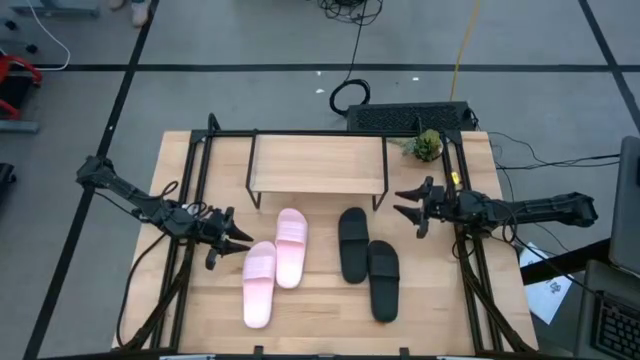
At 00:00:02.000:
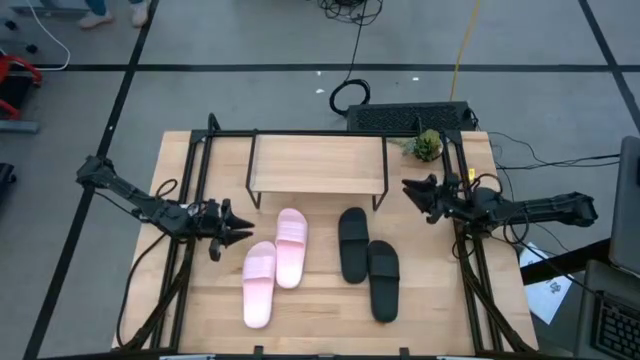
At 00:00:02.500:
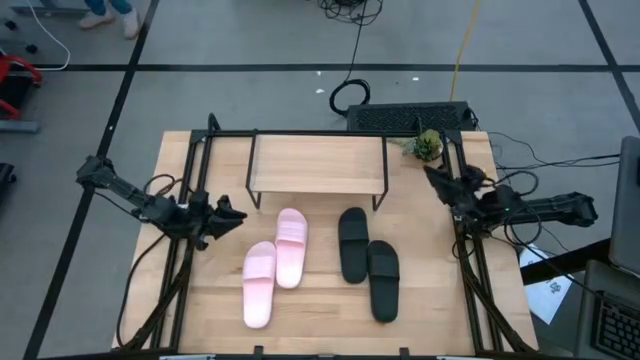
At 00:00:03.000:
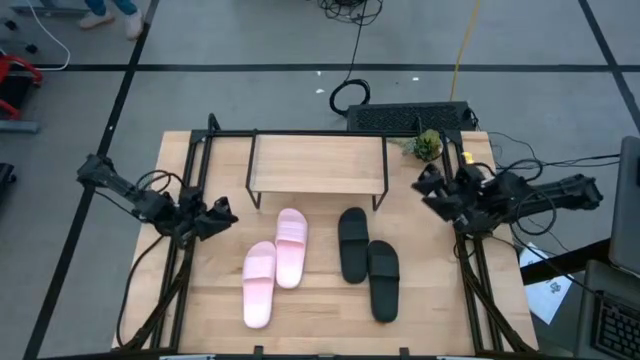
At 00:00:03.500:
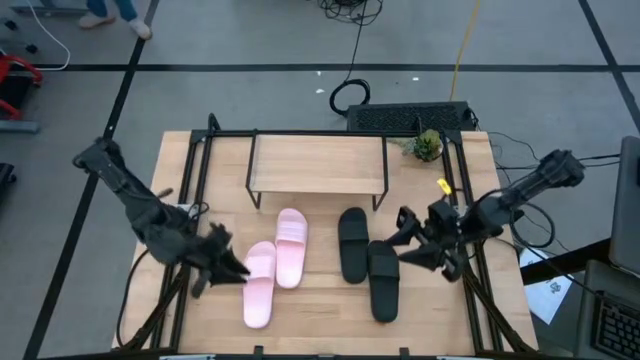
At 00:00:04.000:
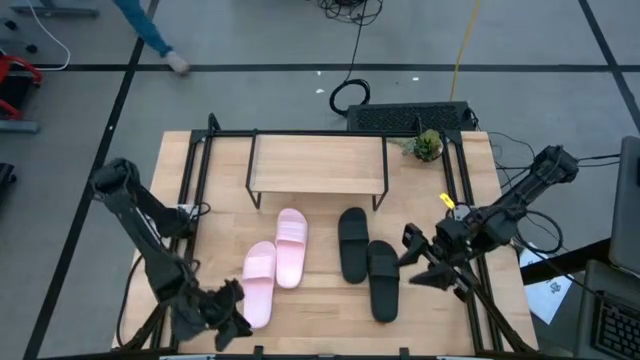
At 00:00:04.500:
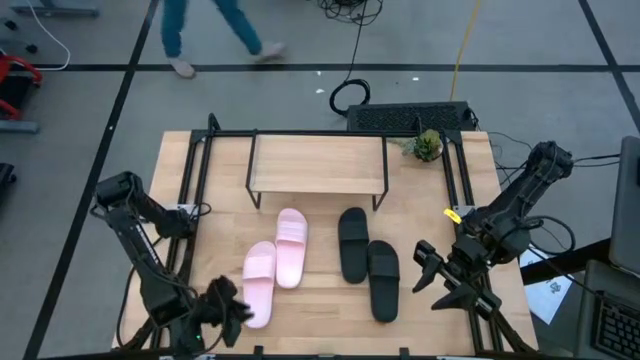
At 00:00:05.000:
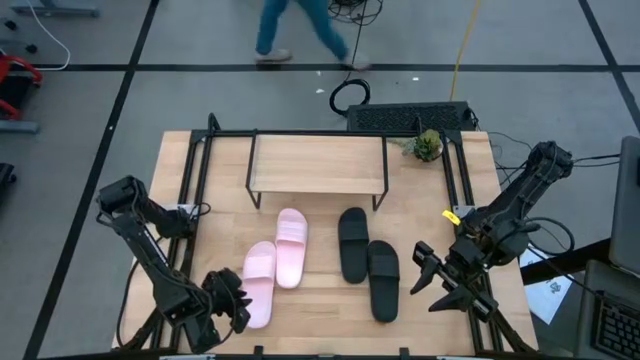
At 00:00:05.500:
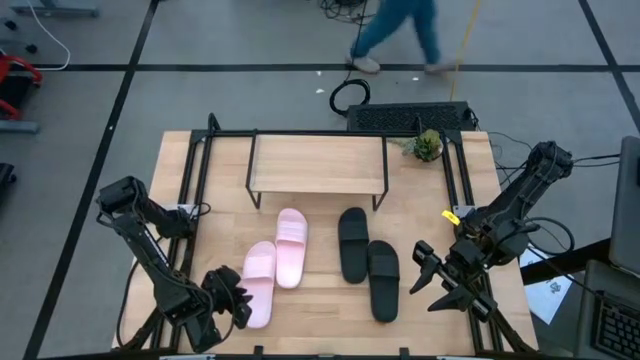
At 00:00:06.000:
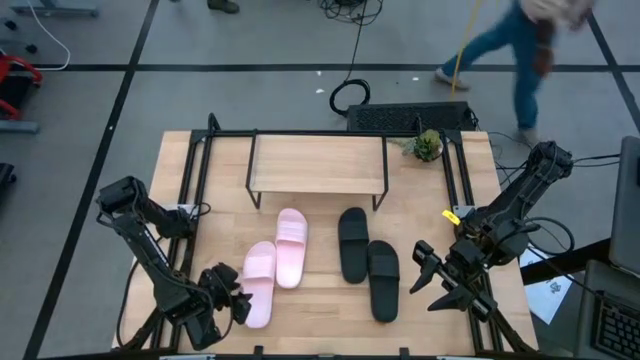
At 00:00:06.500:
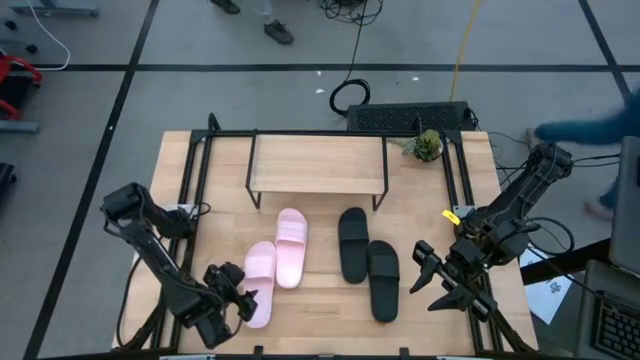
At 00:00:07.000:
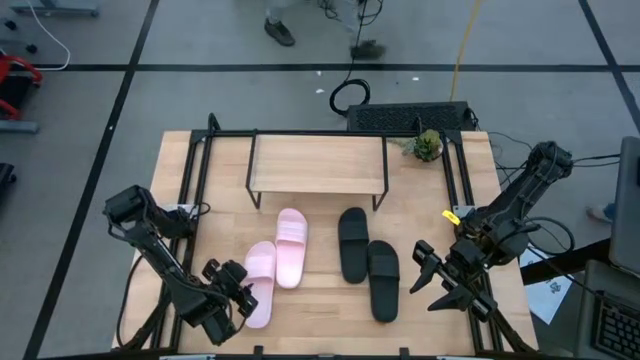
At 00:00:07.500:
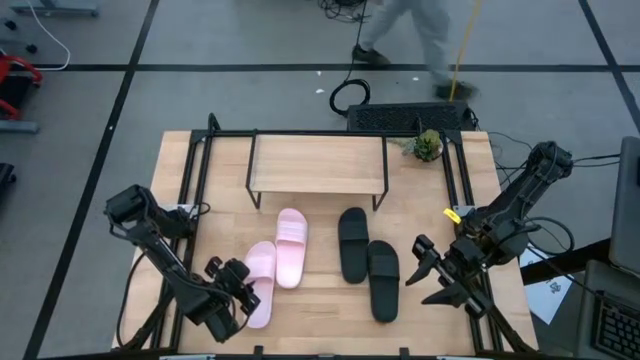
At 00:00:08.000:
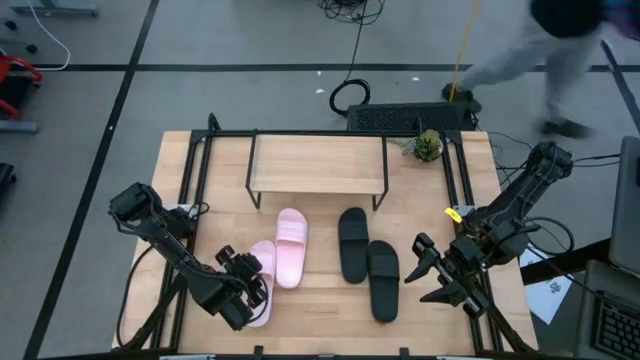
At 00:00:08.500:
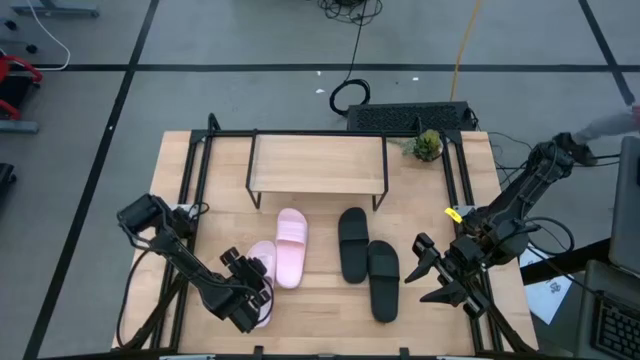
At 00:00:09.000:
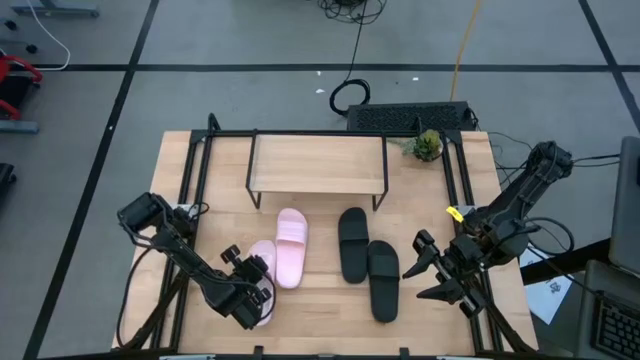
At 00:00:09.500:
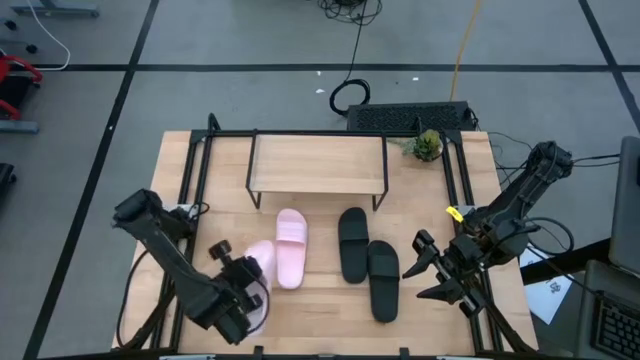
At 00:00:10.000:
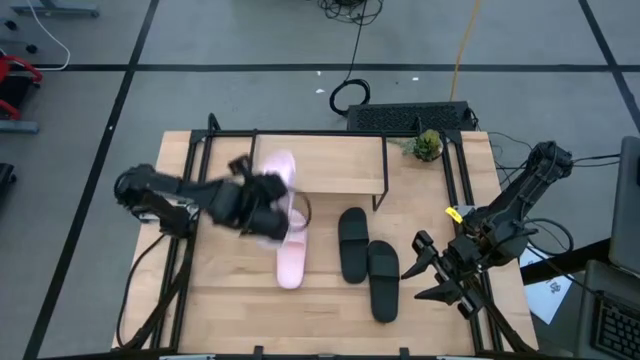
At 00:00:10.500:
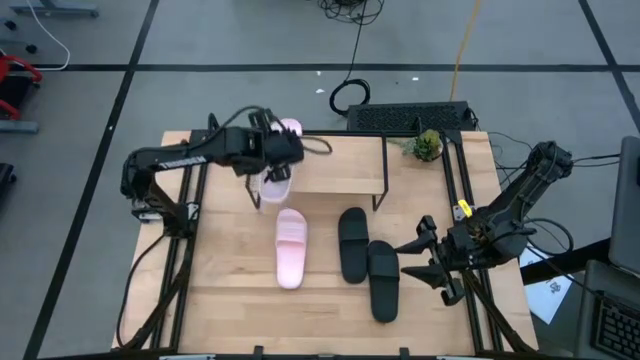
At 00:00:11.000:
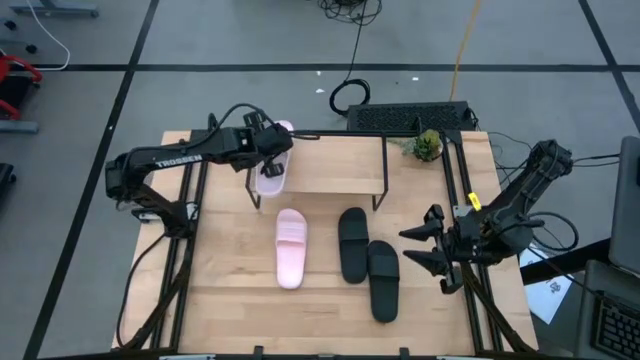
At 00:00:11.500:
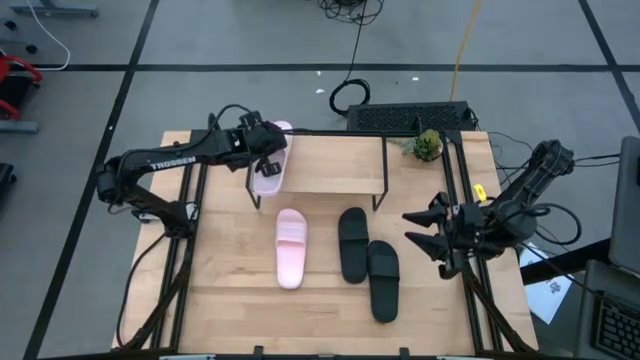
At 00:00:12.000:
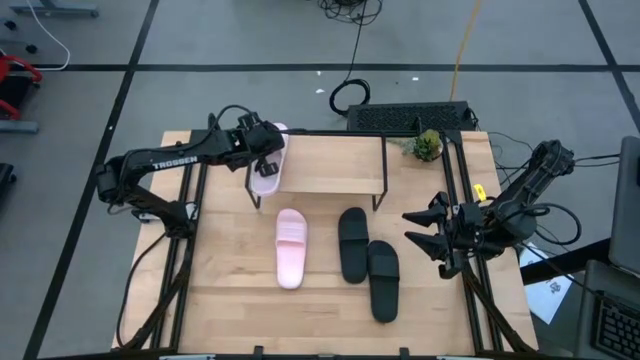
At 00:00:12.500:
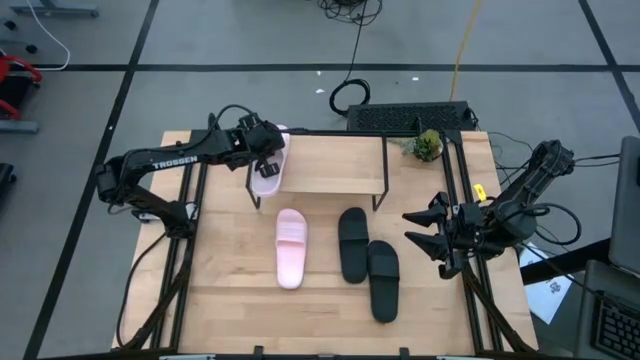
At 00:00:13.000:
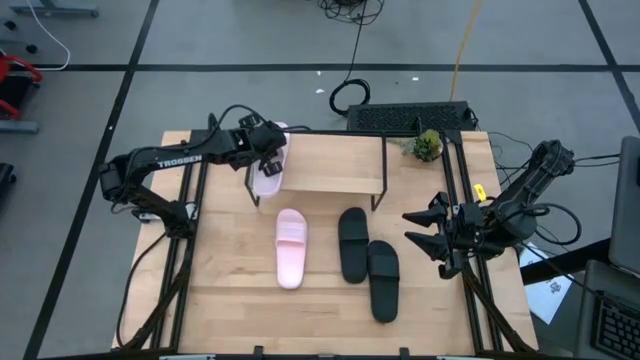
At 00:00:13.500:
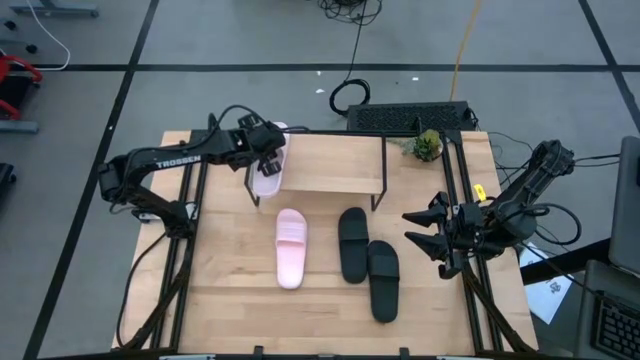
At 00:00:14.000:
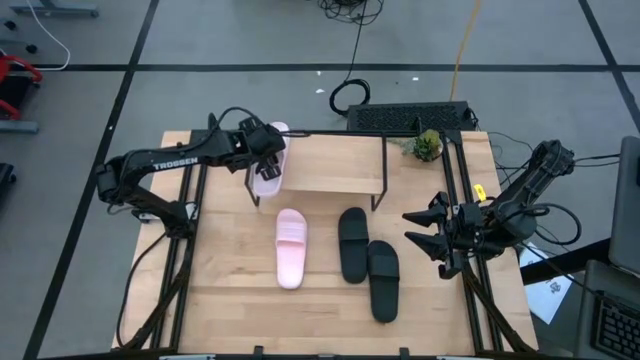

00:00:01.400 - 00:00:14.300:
Task: Pick and place slides into the shelf
Put the left pink slides on the shelf

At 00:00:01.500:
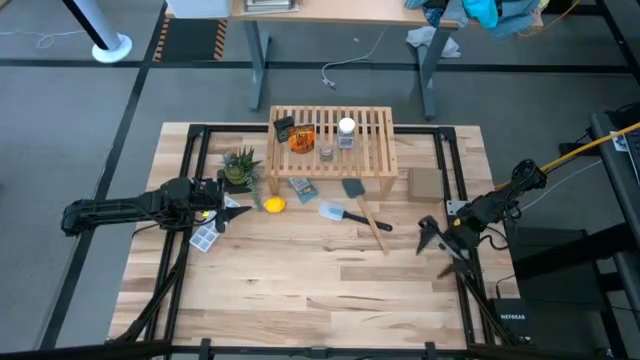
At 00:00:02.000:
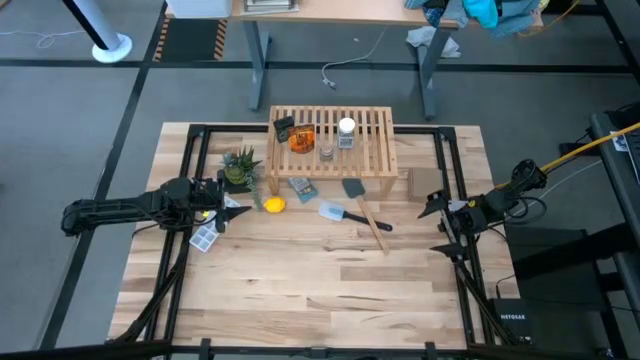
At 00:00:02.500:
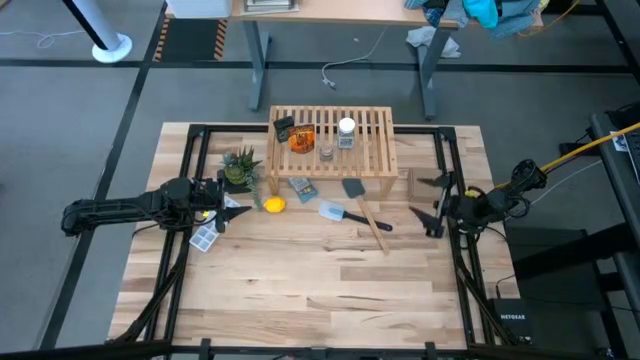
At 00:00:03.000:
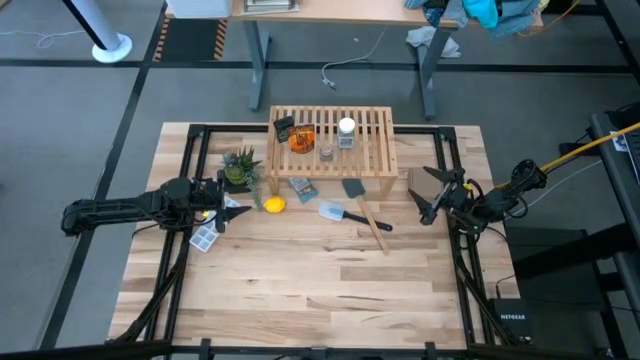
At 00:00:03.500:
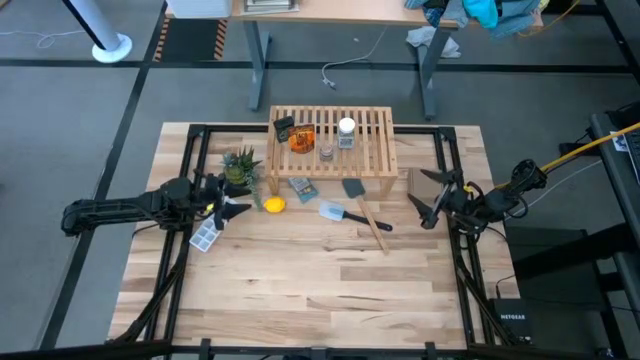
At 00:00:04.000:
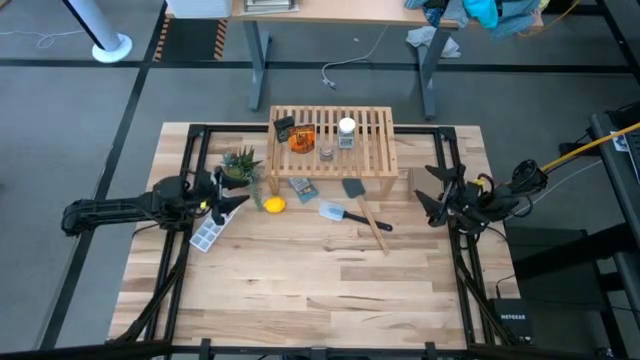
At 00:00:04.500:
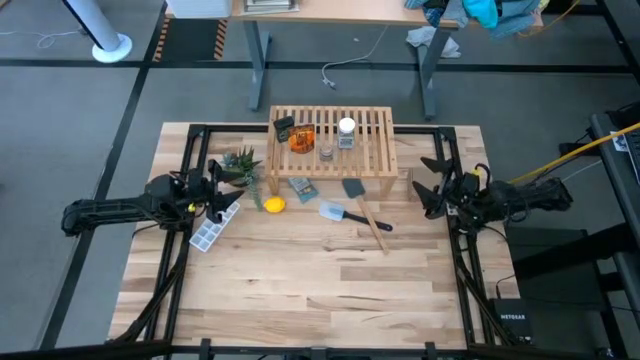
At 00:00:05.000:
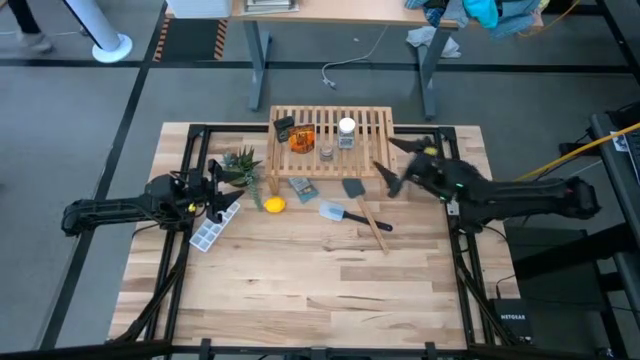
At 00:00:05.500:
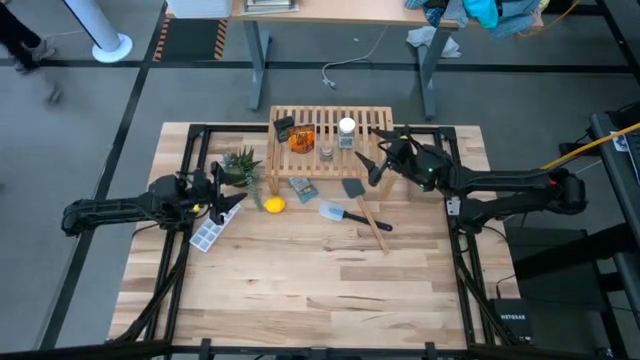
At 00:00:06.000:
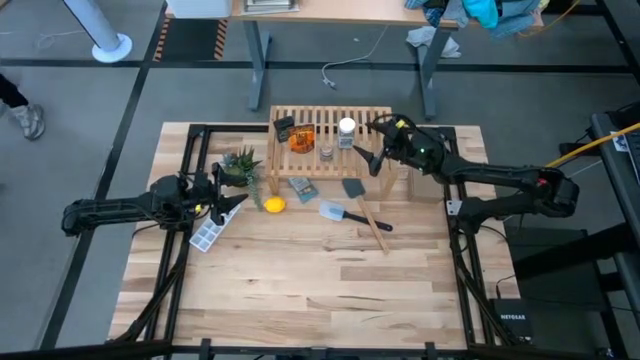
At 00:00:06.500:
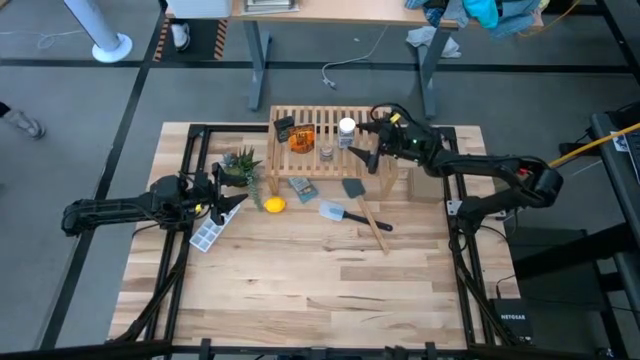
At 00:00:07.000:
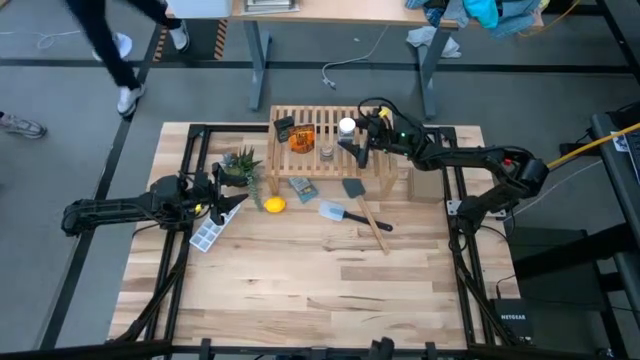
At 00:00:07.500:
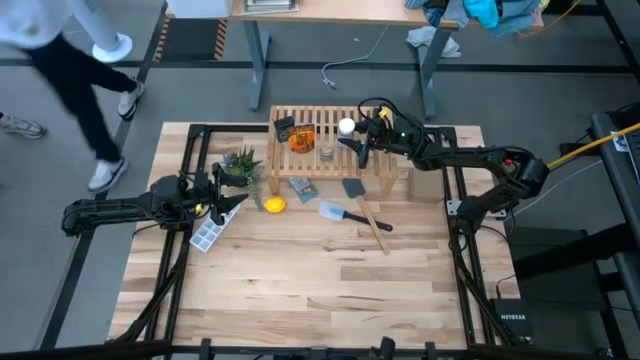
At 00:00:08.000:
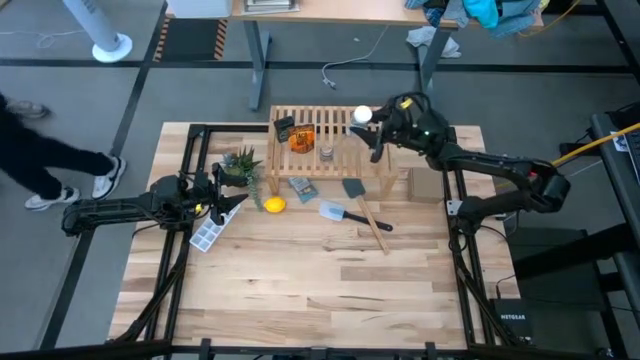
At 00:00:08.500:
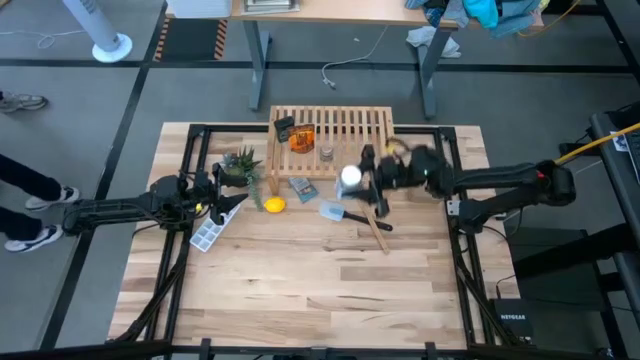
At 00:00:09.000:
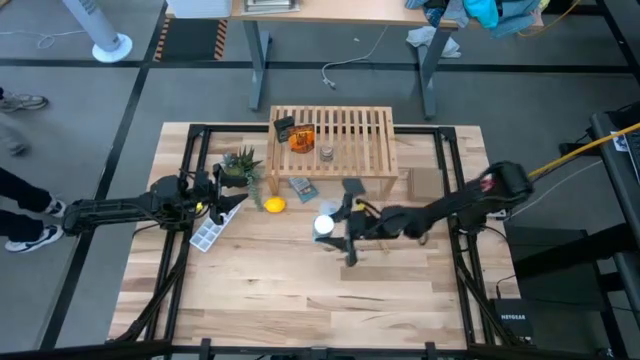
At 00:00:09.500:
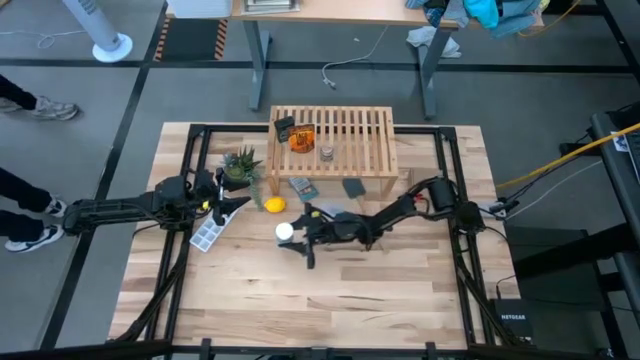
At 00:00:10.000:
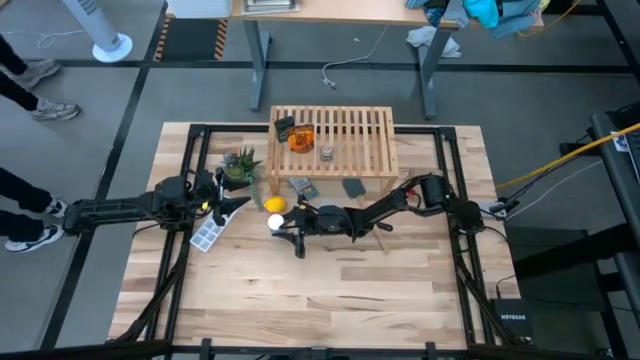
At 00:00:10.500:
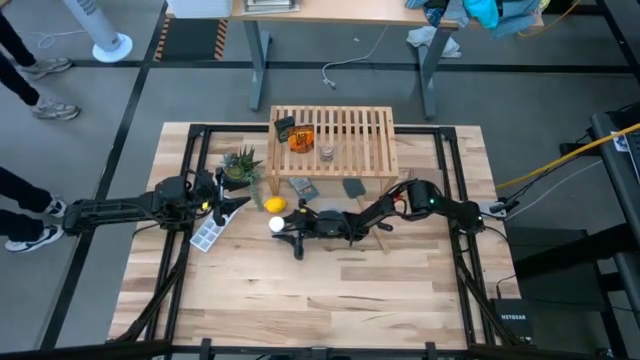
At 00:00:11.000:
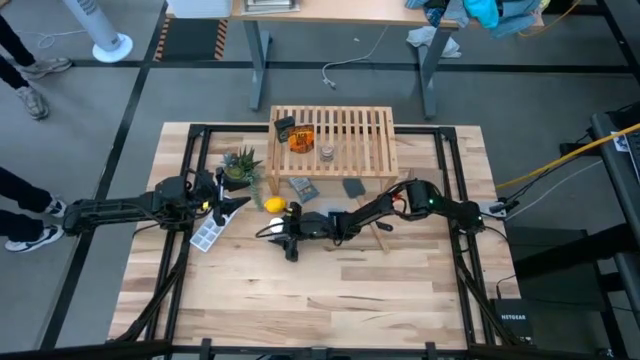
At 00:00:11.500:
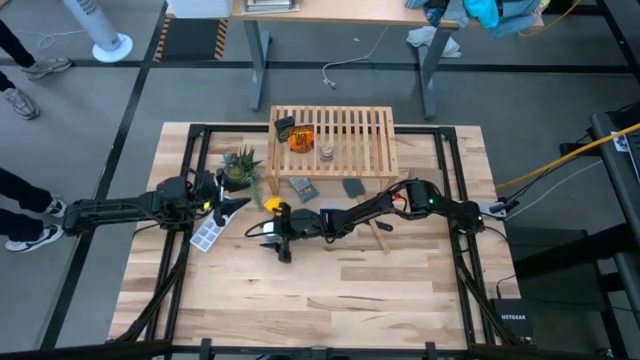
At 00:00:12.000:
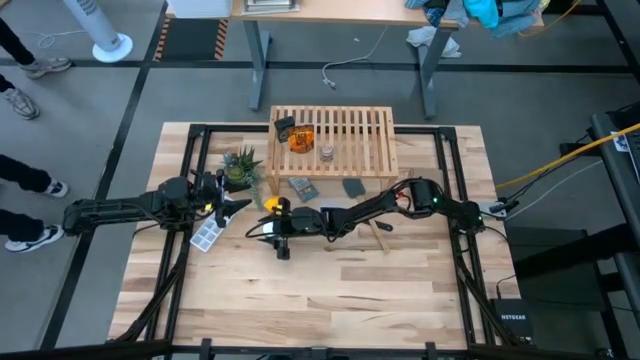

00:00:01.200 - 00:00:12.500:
Task: Shelf spices
Remove the white seasoning bottle from the shelf
